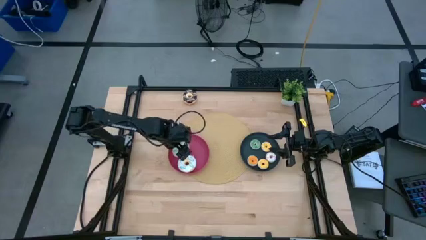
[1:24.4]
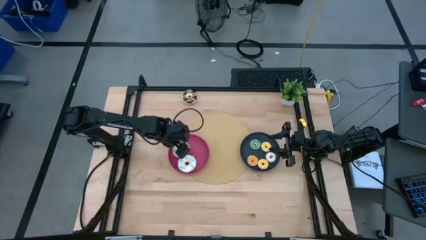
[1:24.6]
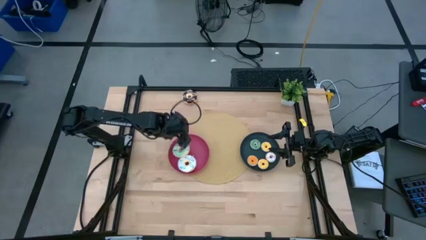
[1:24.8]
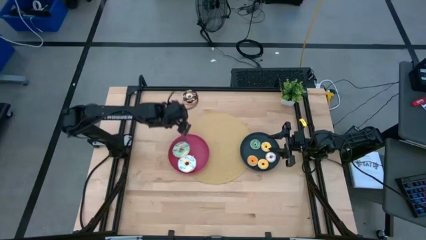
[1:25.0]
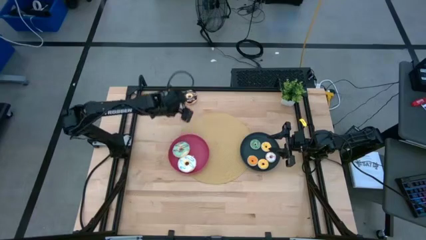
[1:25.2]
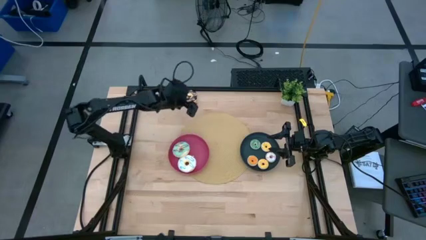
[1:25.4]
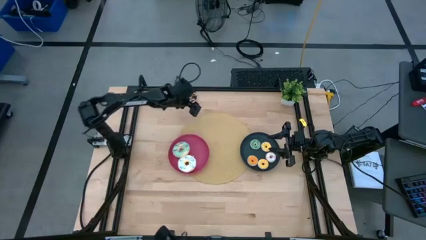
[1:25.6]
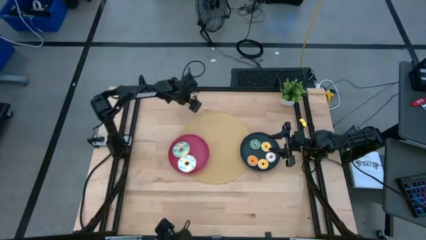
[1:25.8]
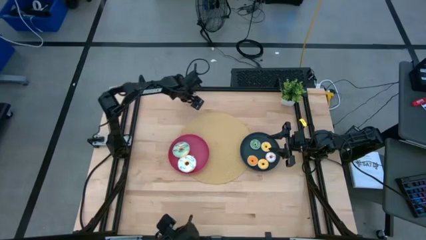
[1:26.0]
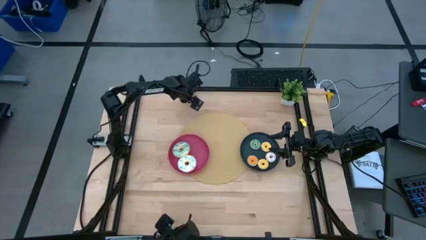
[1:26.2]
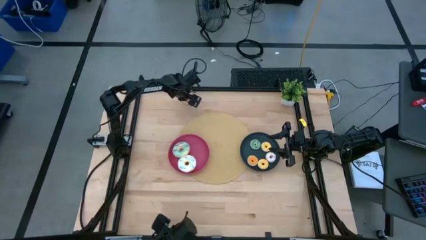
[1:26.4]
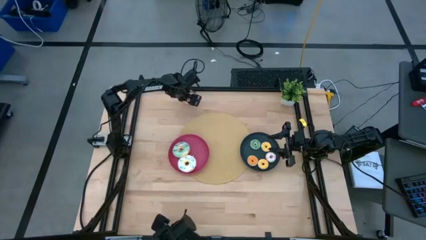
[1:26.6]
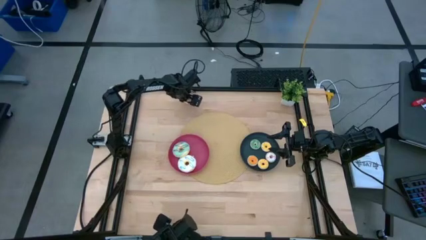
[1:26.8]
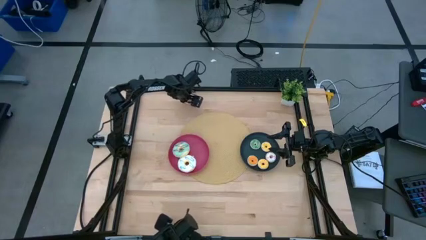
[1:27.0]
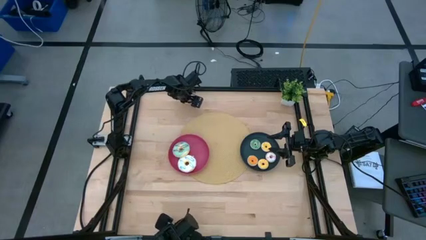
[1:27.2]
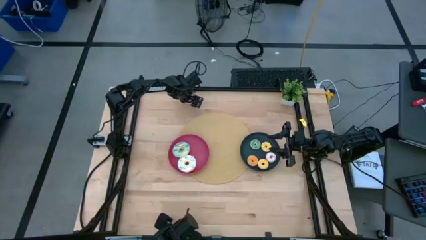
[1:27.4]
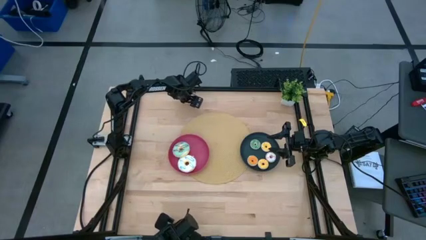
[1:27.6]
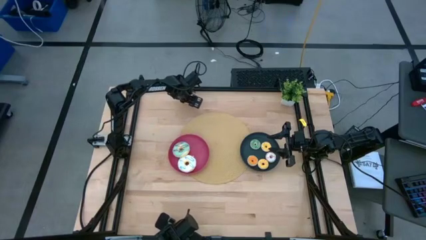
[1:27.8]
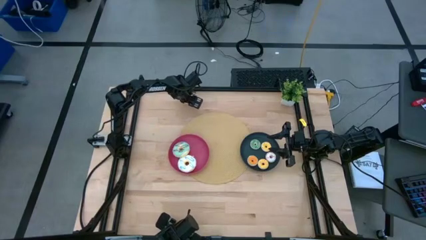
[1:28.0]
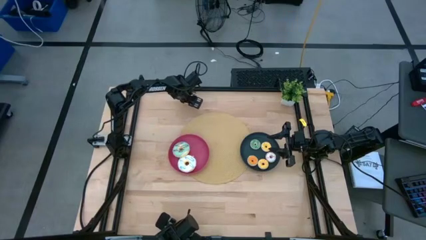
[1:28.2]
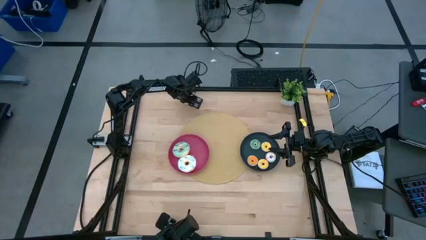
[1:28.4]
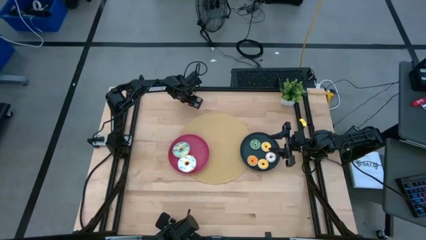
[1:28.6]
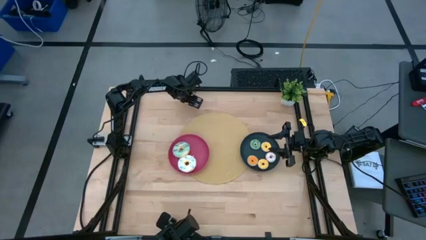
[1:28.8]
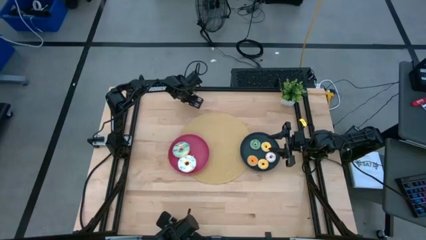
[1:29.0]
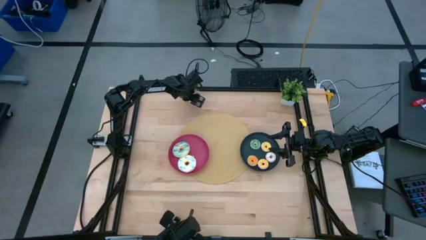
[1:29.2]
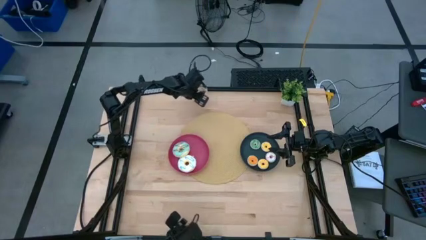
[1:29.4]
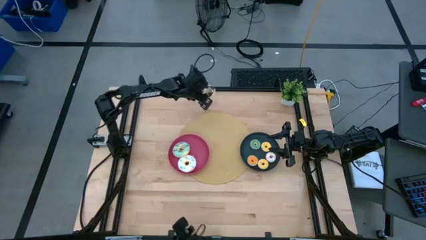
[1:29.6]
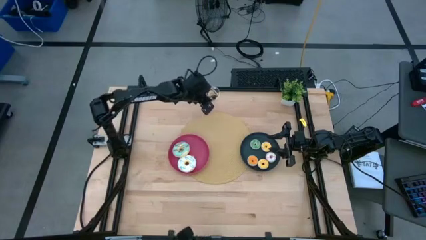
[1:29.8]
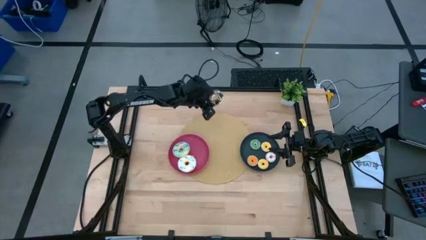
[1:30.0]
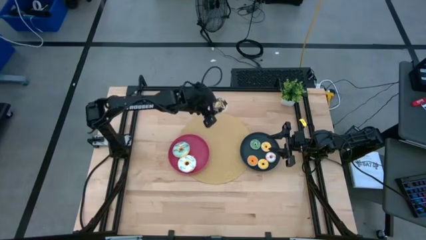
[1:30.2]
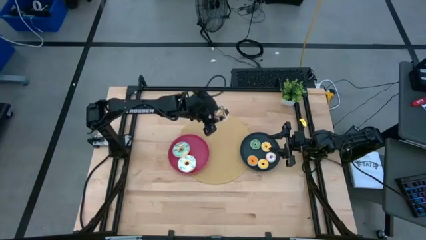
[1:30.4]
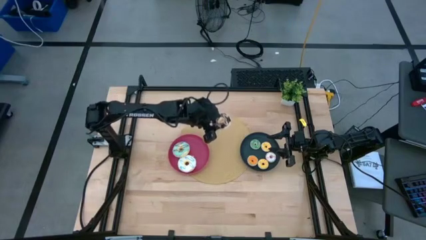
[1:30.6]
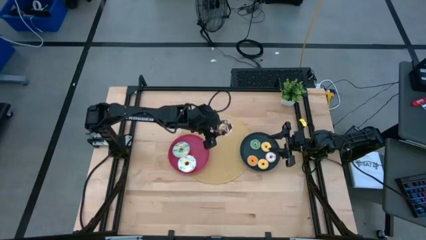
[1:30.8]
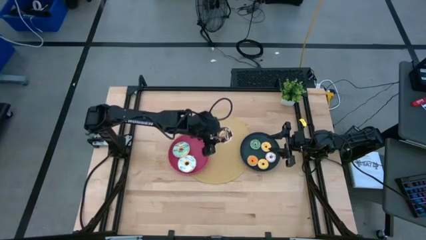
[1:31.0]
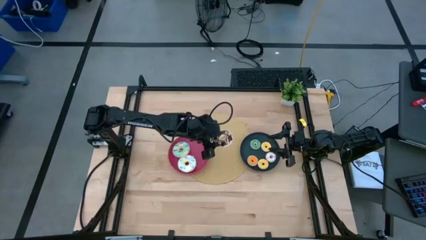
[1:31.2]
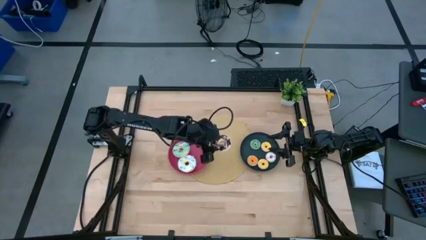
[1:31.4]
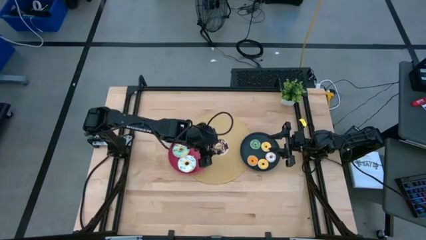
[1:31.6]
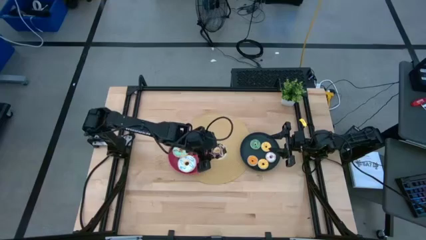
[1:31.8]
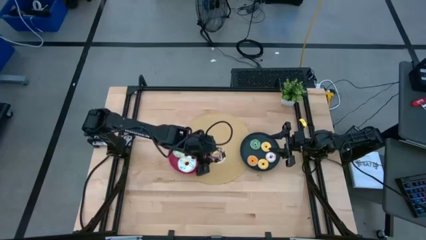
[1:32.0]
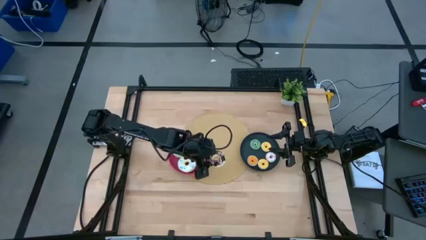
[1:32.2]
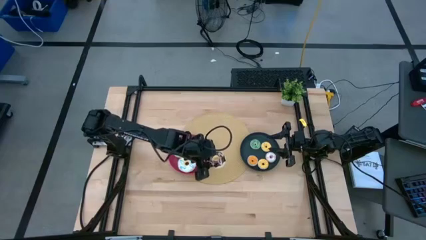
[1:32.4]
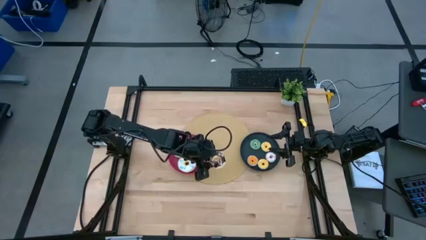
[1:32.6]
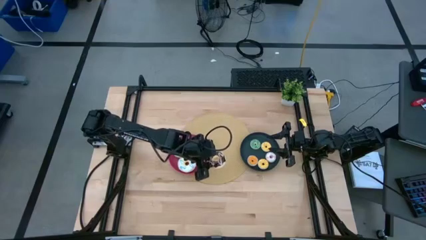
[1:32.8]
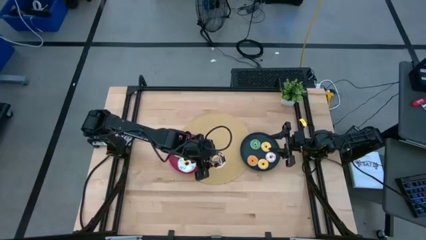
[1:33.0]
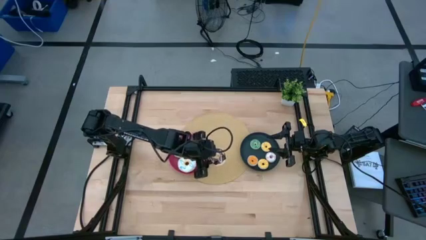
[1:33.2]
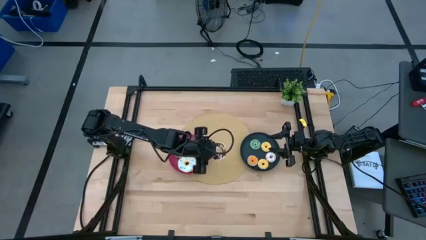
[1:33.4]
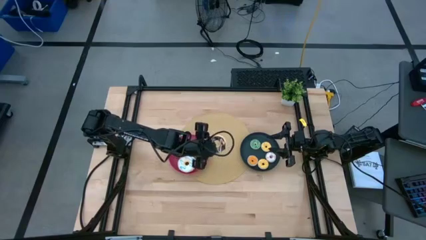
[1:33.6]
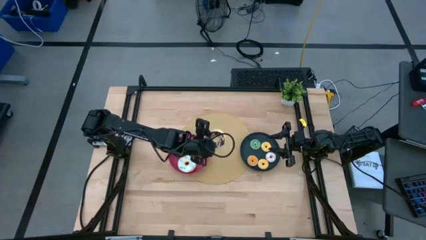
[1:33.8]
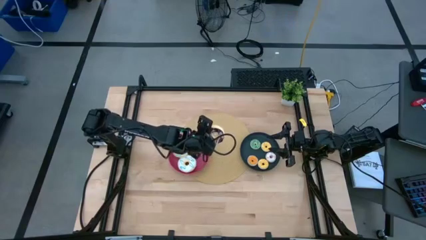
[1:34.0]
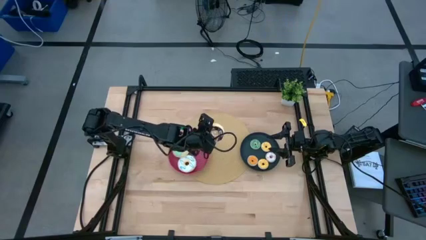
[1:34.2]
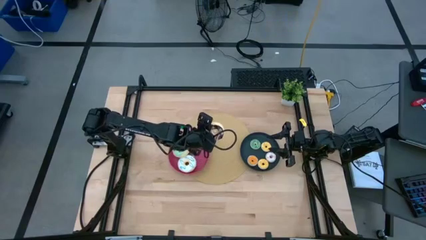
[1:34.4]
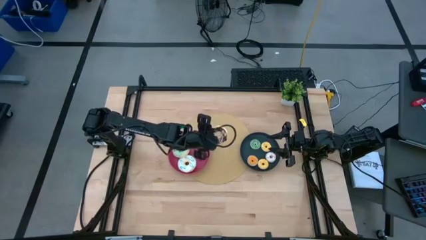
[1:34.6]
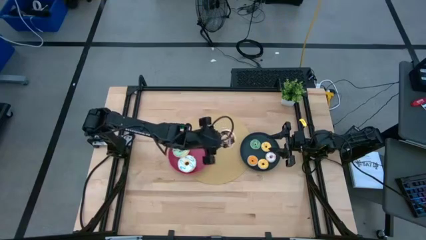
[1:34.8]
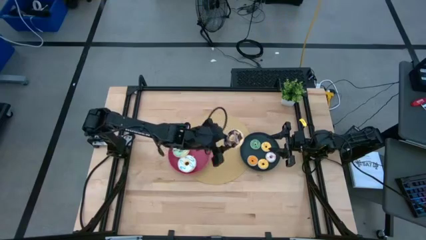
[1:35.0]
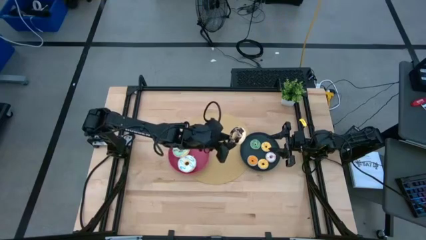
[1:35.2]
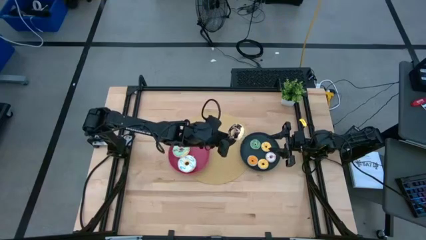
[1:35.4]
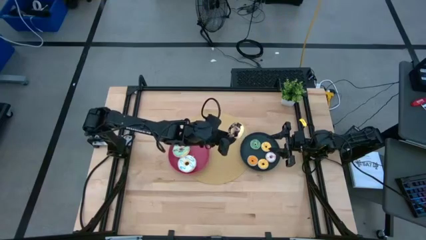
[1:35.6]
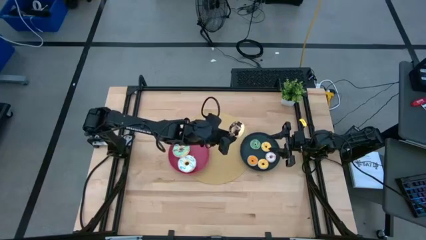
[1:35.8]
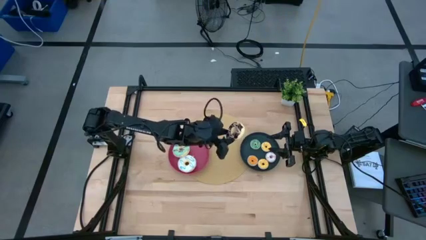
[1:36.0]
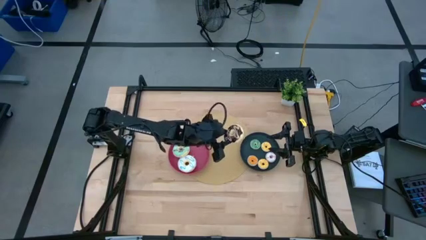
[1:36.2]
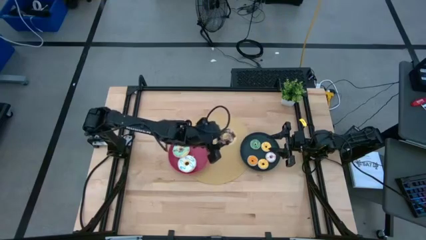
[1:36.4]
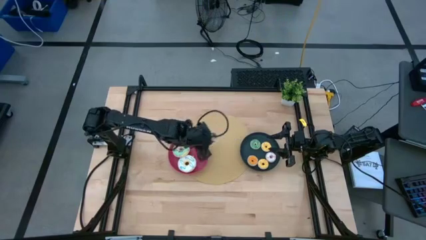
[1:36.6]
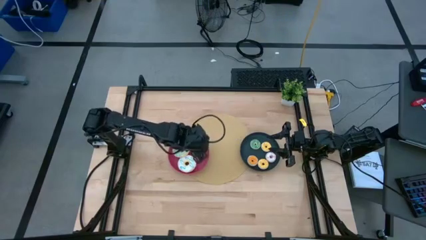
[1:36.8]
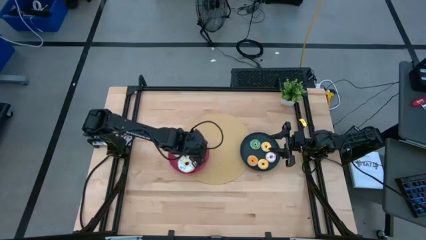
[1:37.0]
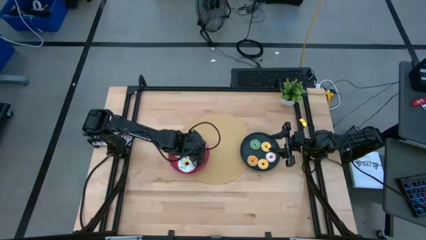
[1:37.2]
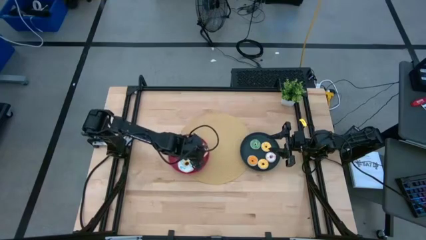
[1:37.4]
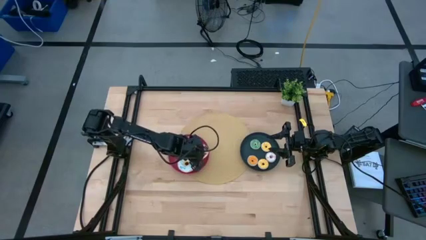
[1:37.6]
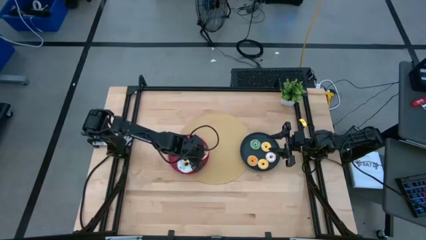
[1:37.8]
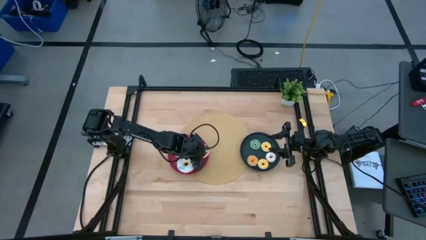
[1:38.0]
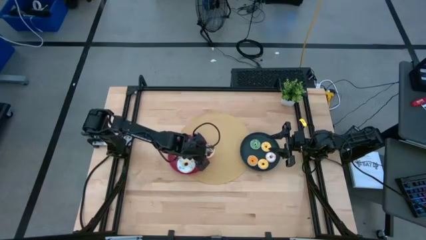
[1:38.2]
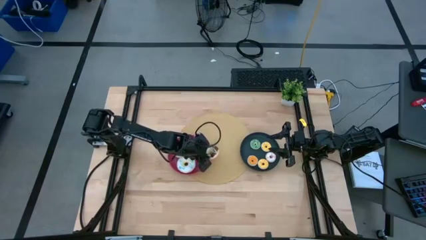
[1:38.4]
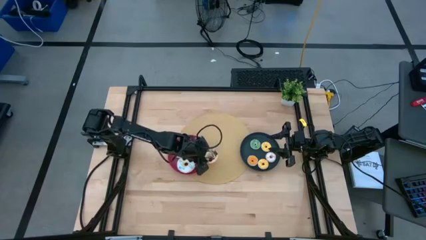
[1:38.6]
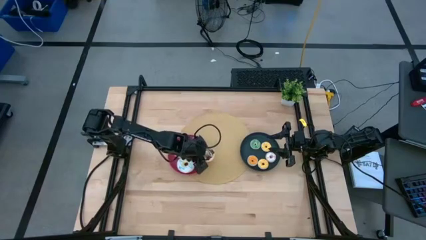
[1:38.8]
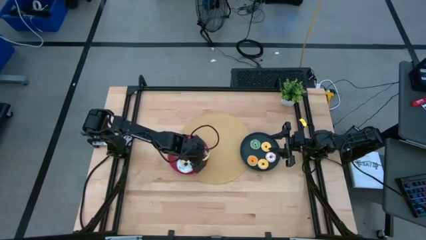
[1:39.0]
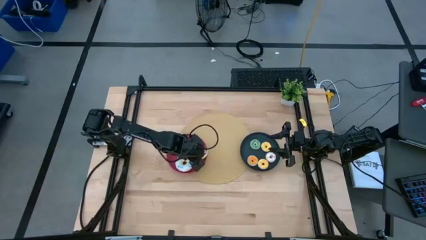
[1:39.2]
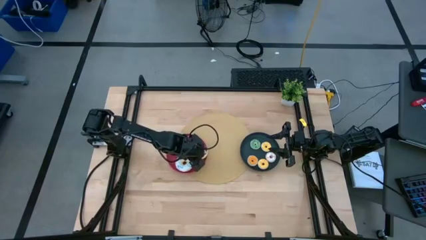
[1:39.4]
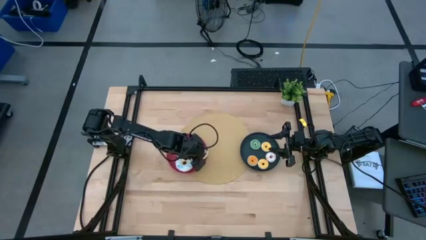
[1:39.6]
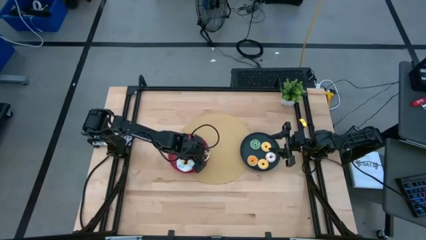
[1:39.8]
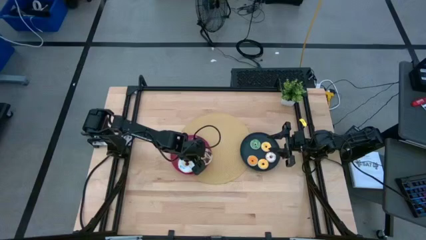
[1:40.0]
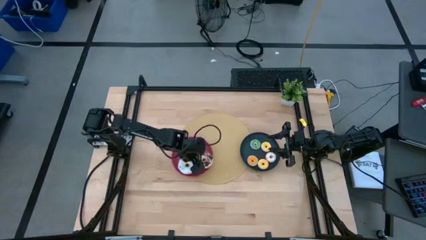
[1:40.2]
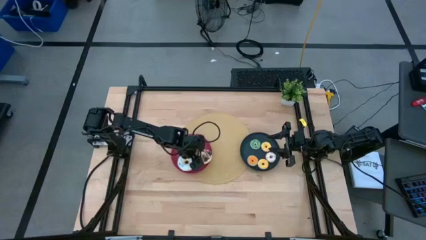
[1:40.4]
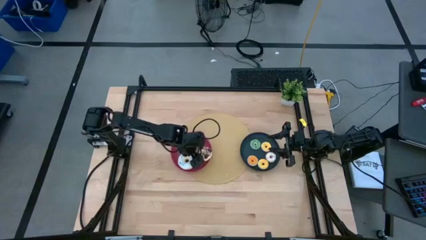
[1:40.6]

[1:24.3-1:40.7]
Task: Pick & Place donuts
Put the large black donut on the pink plate
